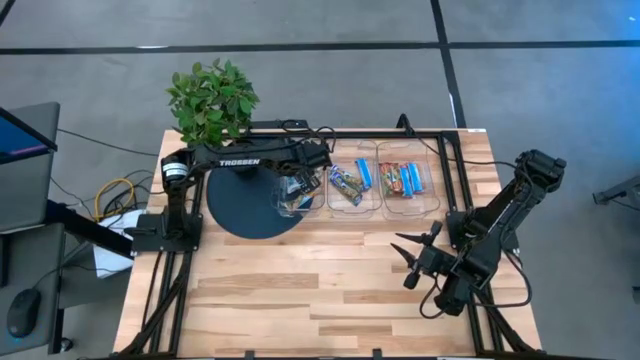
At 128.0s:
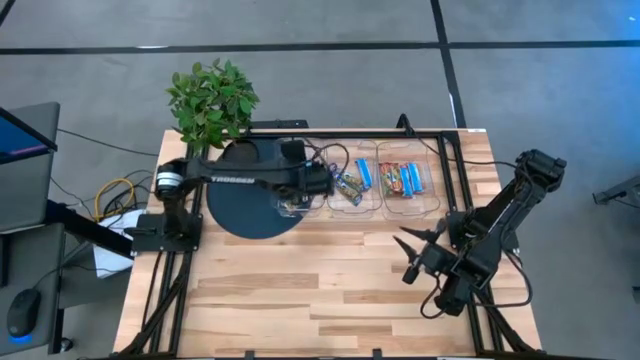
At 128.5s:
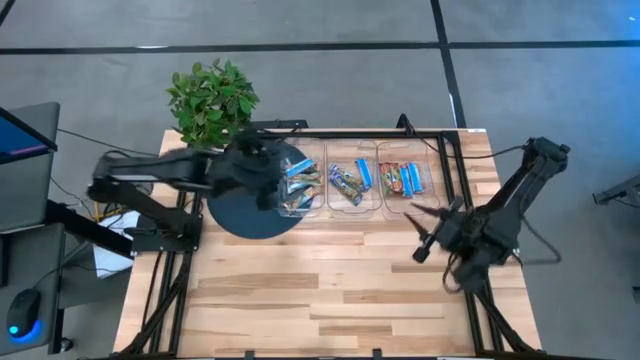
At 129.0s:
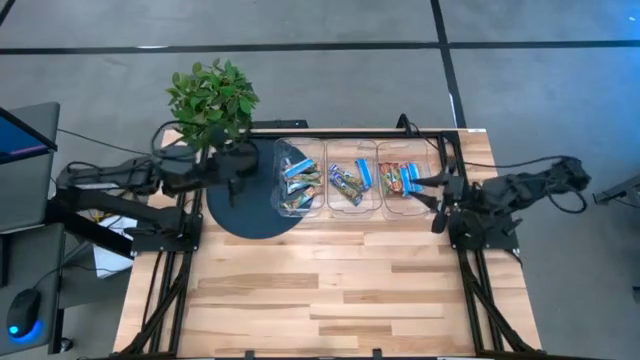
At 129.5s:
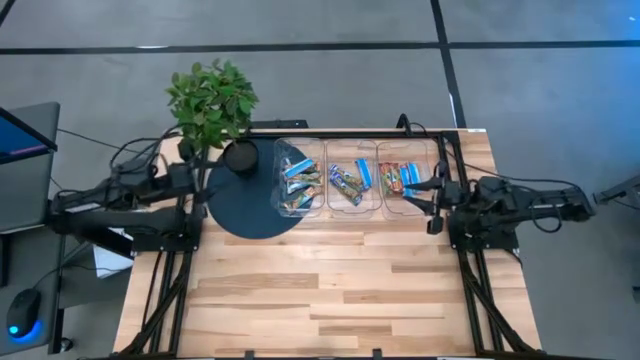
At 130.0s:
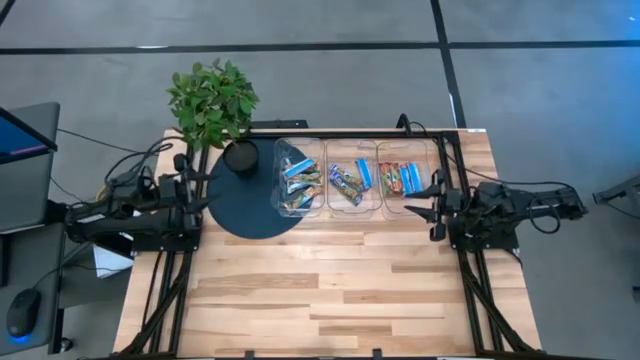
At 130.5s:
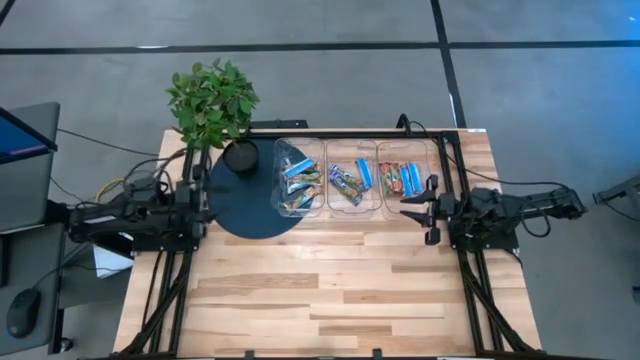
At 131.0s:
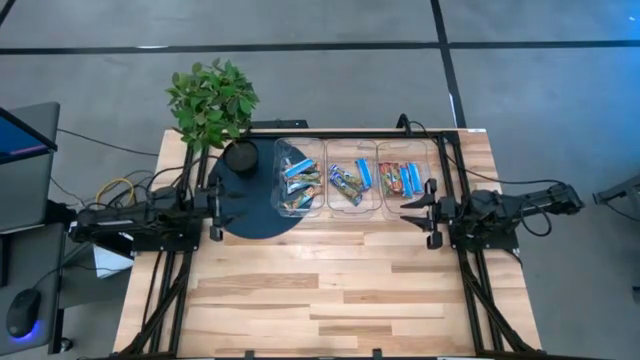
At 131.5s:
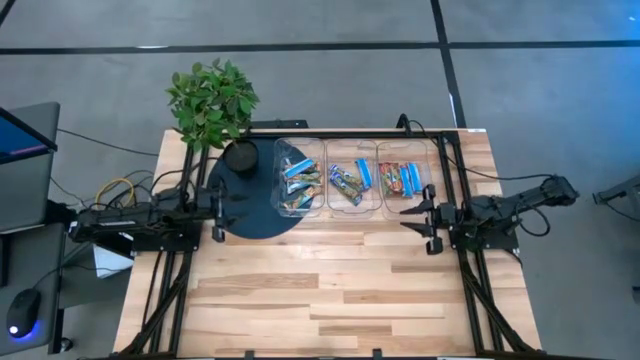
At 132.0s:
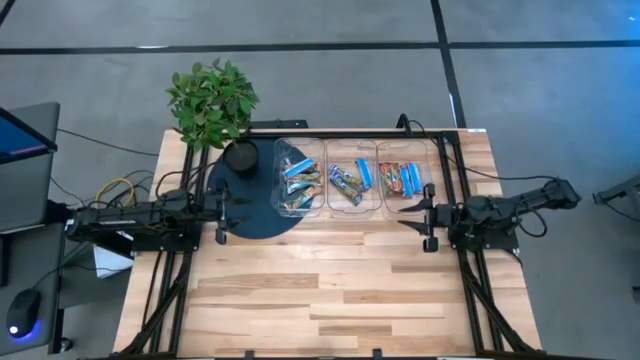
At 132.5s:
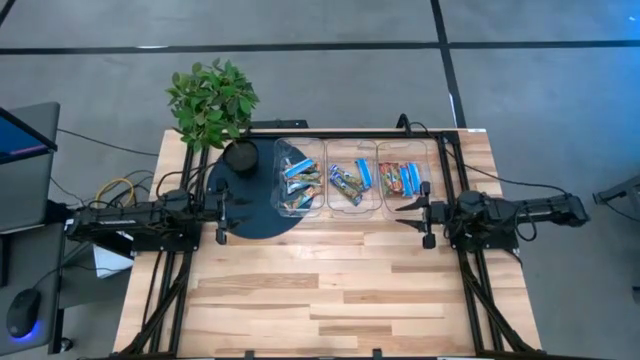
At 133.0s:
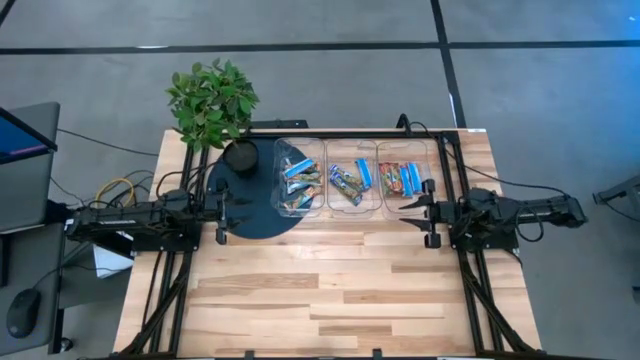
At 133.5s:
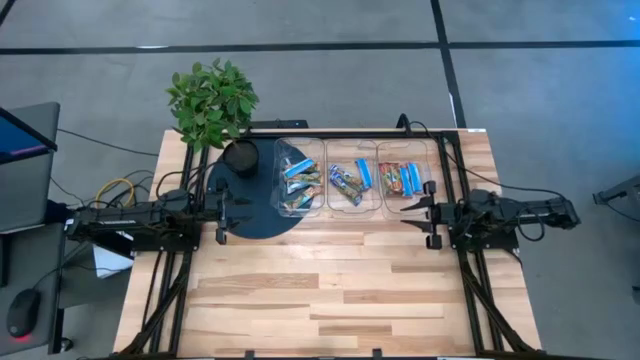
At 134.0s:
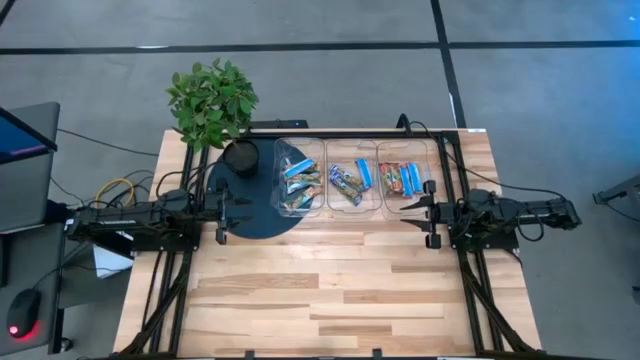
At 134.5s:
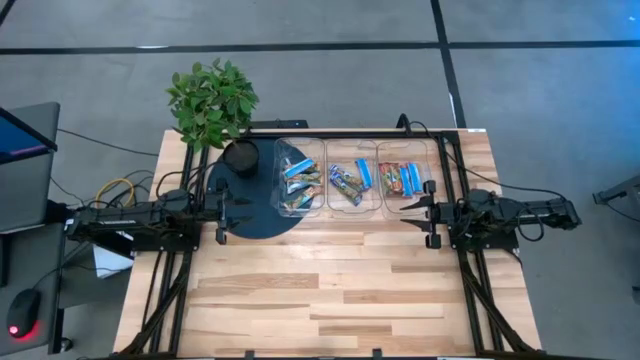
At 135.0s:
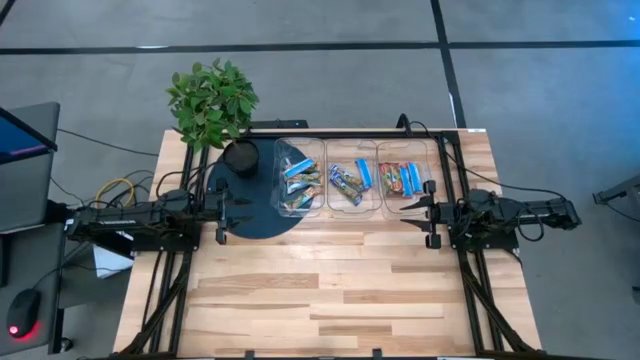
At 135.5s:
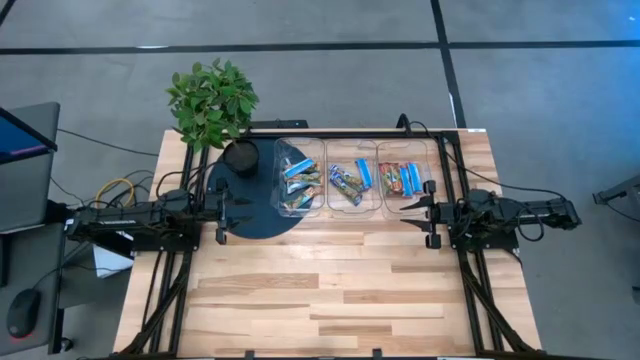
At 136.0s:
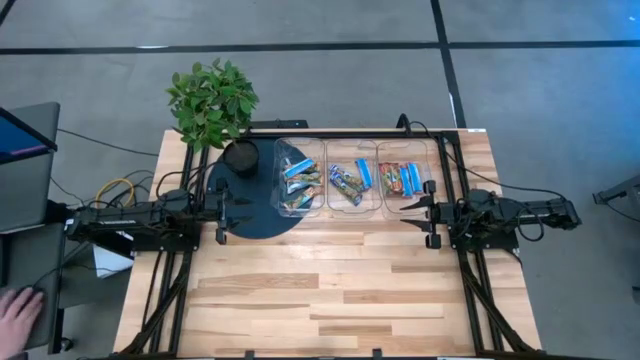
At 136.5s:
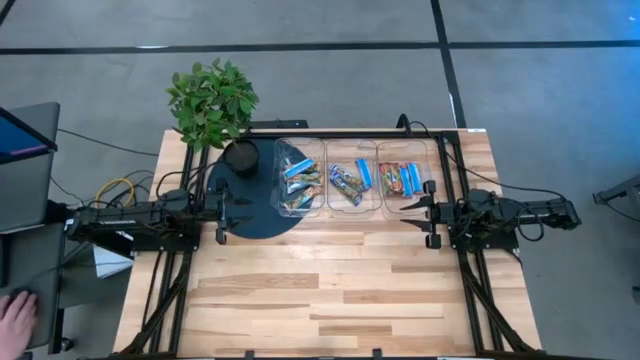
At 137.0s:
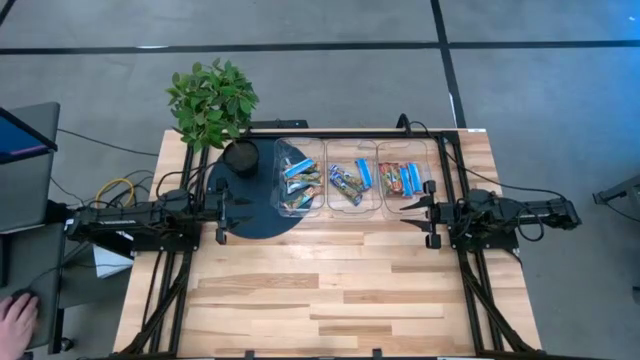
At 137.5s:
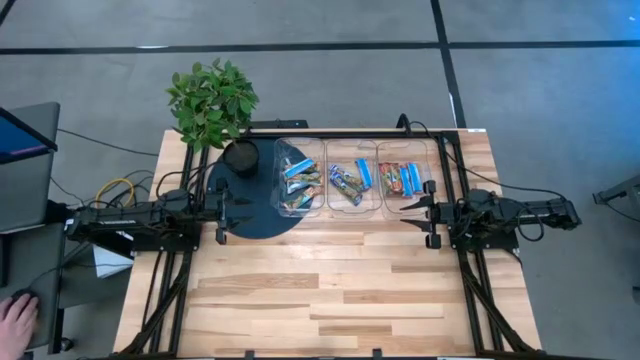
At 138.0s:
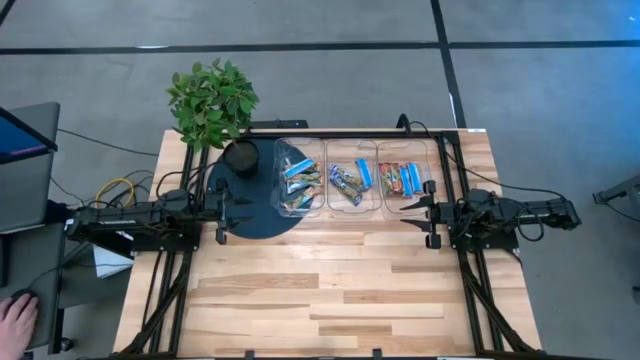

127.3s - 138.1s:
Task: Pick and place Granola Bars by type
Return to Home Position

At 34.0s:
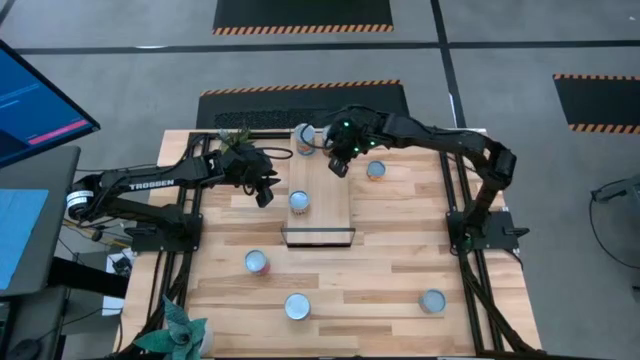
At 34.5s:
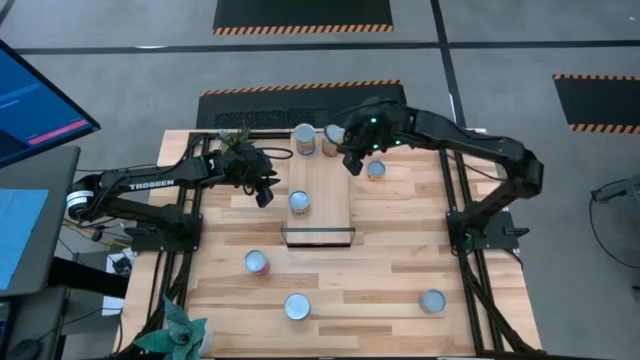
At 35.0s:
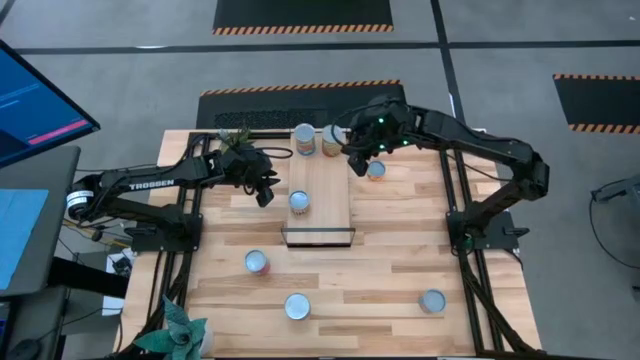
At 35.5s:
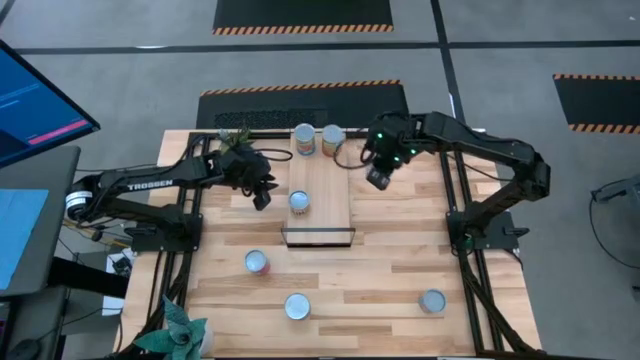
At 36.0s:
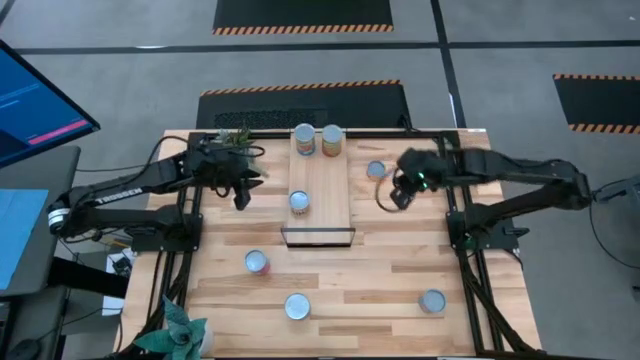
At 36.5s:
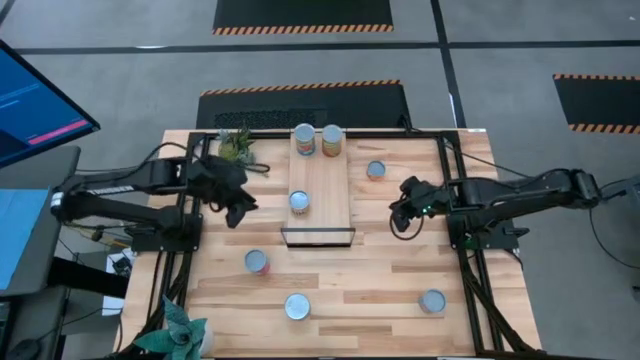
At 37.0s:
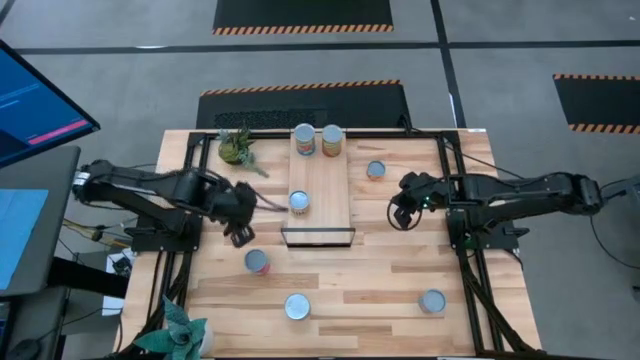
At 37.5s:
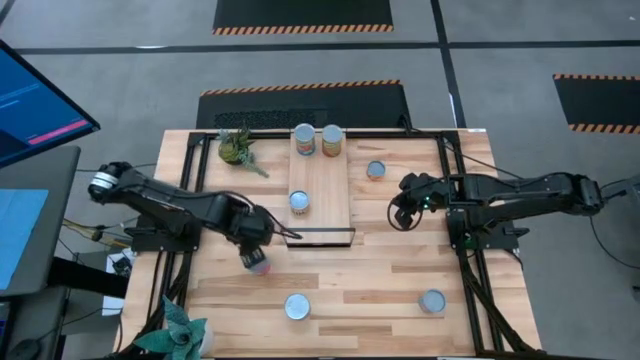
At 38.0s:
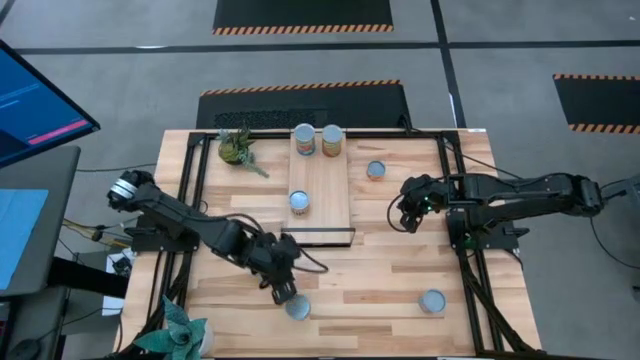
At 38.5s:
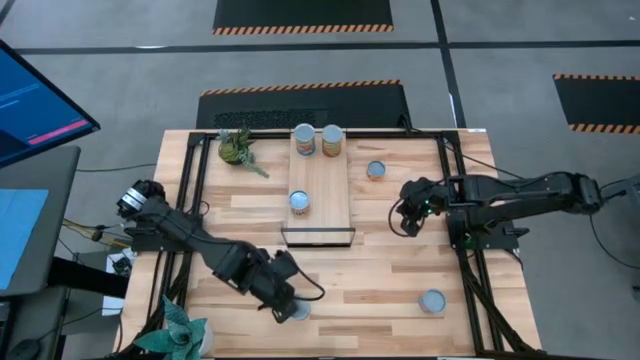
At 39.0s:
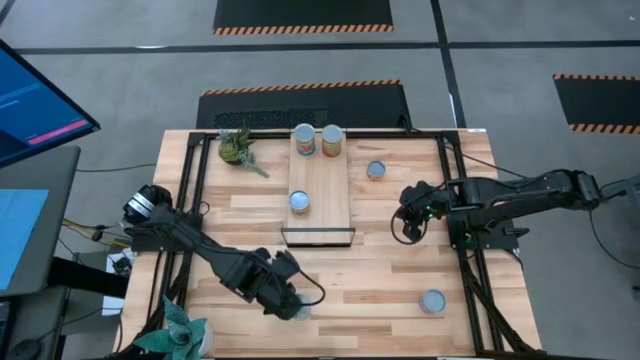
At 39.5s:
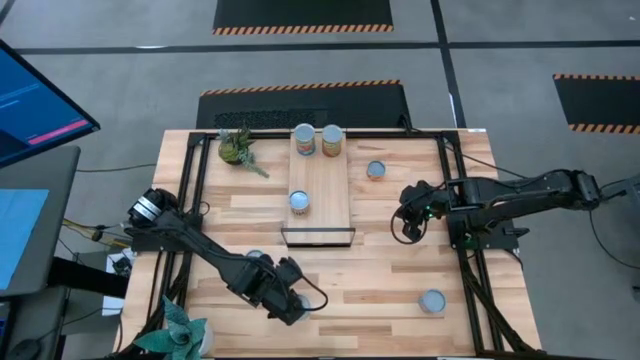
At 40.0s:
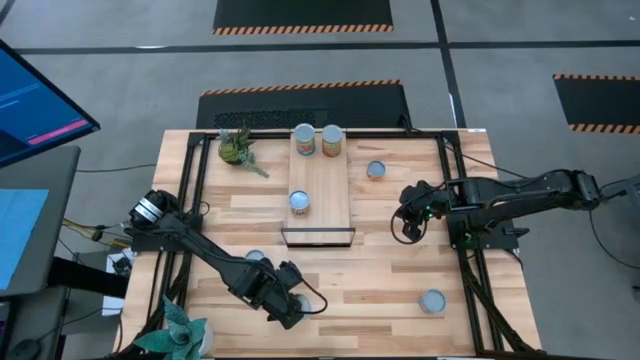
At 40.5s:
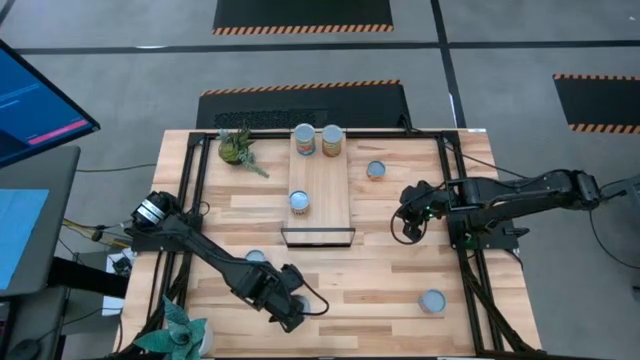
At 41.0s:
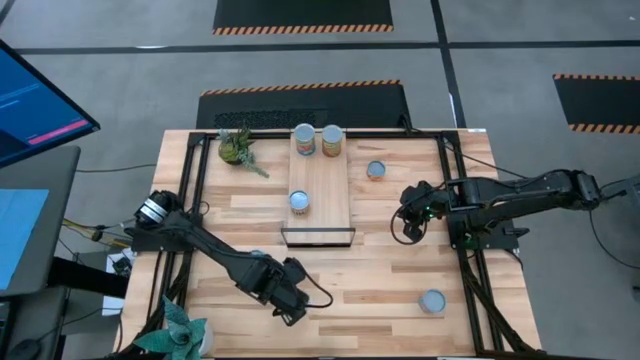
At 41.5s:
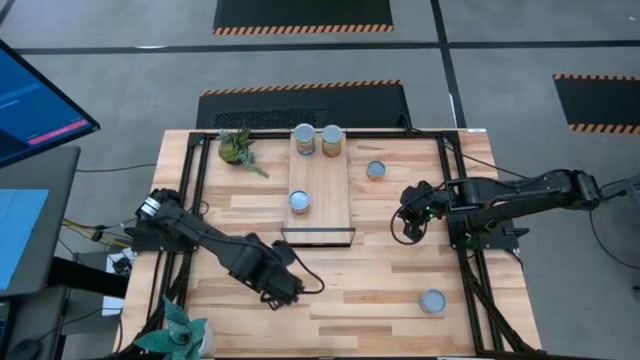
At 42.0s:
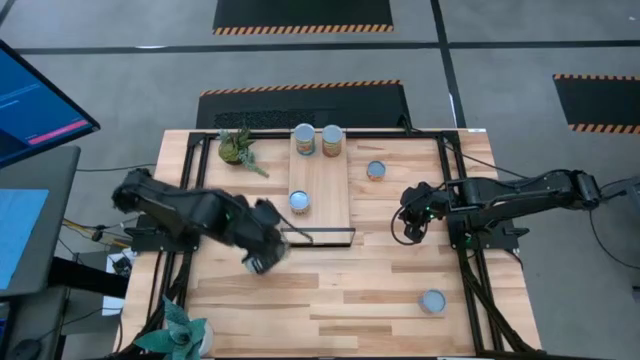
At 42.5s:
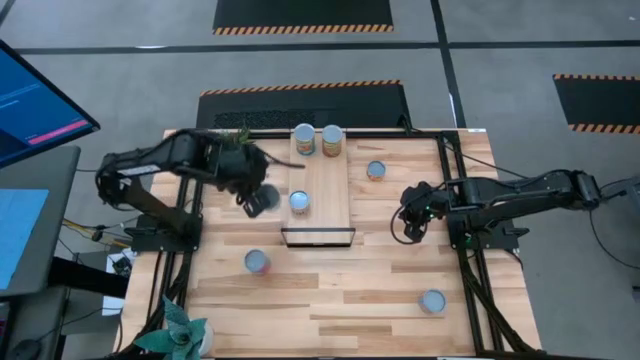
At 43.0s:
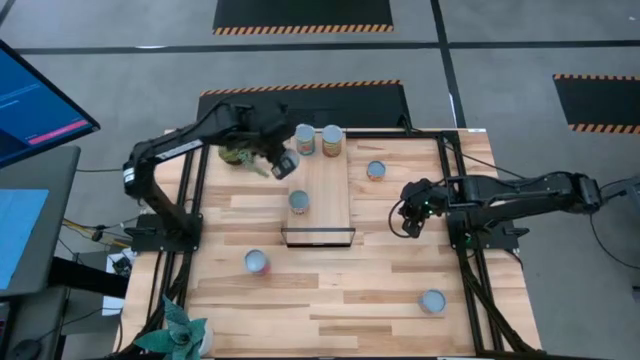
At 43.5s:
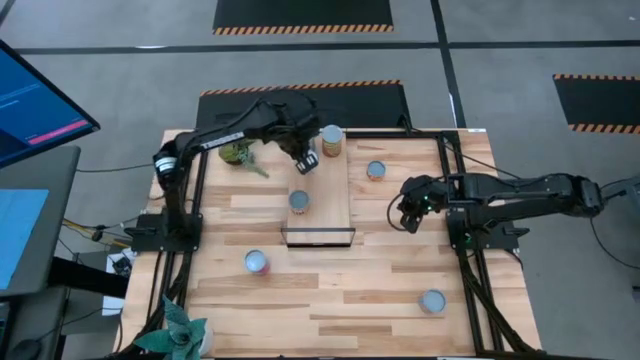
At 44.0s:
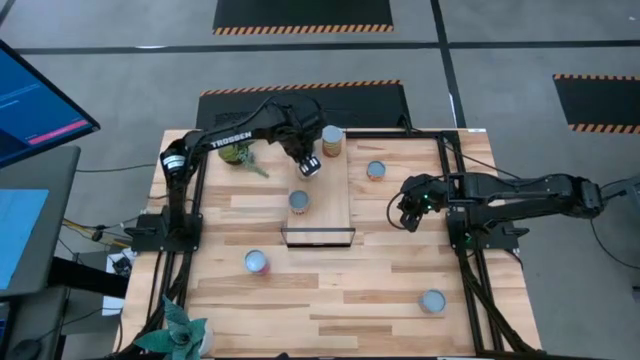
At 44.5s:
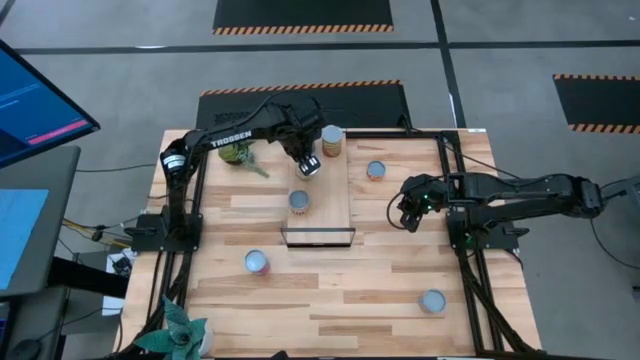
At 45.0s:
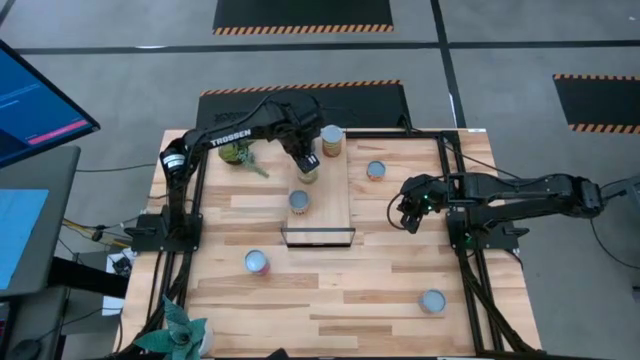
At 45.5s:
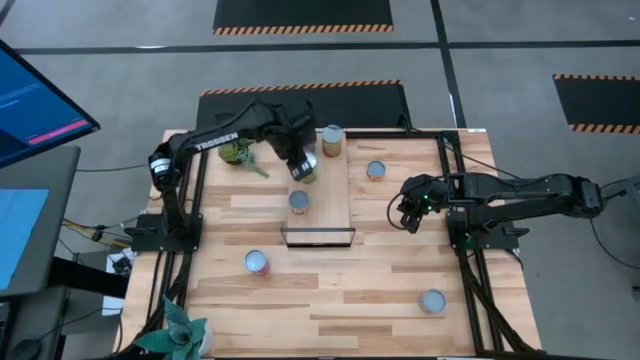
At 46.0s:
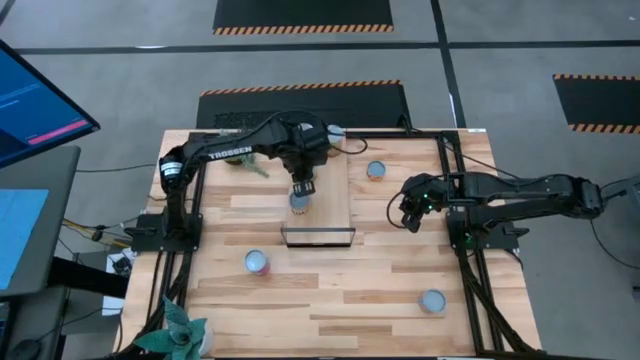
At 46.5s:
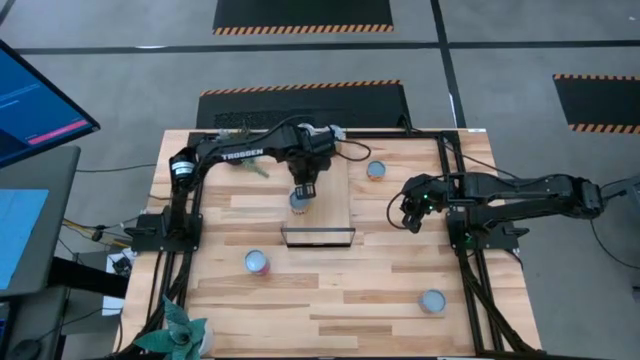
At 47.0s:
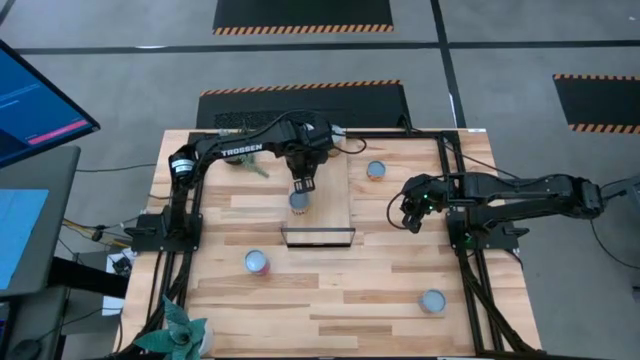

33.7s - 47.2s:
Task: Pick and place cans onto a shelf
Put the canned pears on the shelf
